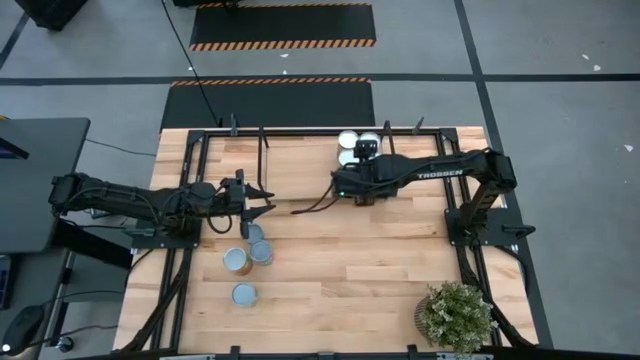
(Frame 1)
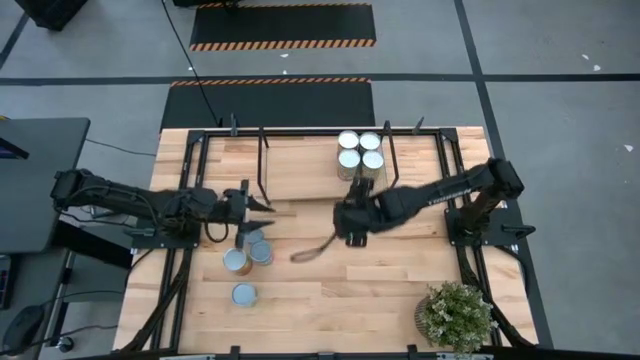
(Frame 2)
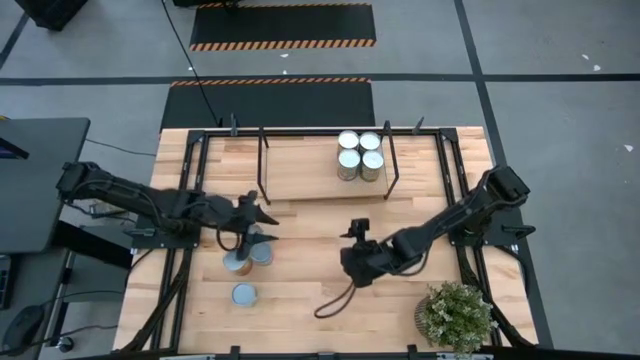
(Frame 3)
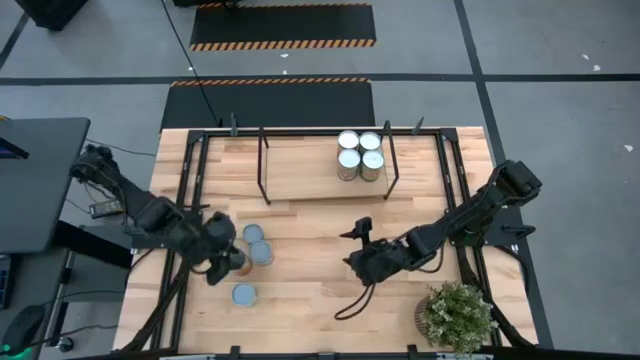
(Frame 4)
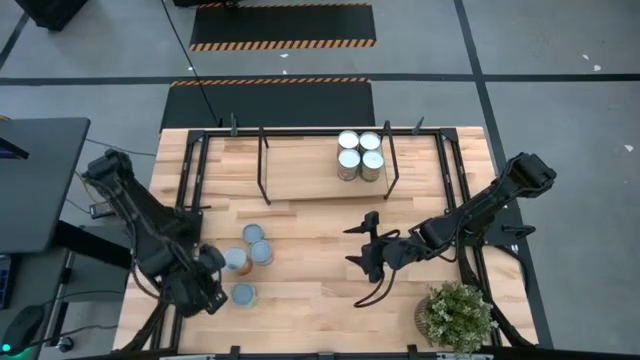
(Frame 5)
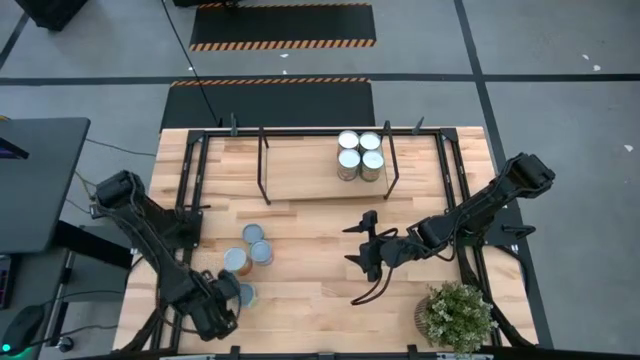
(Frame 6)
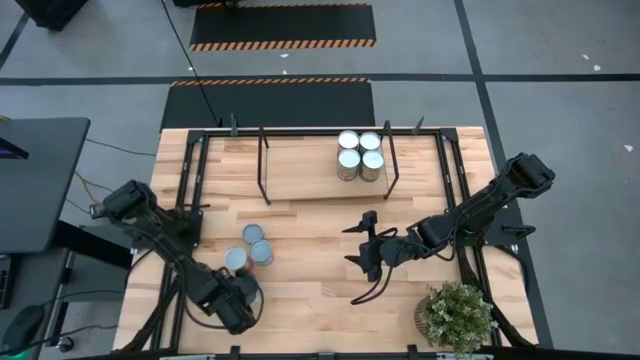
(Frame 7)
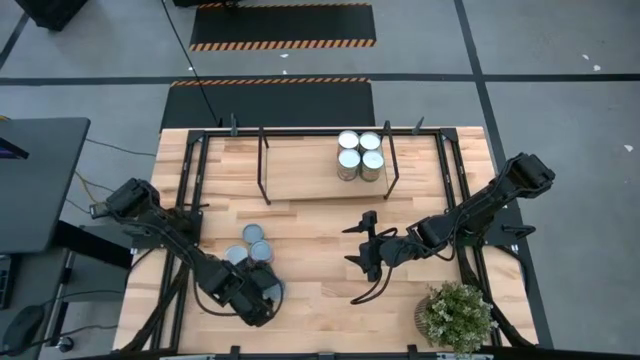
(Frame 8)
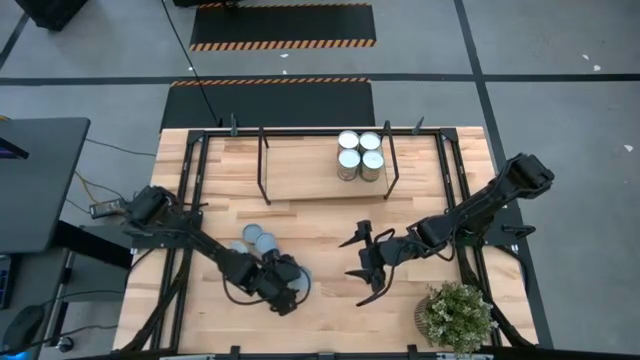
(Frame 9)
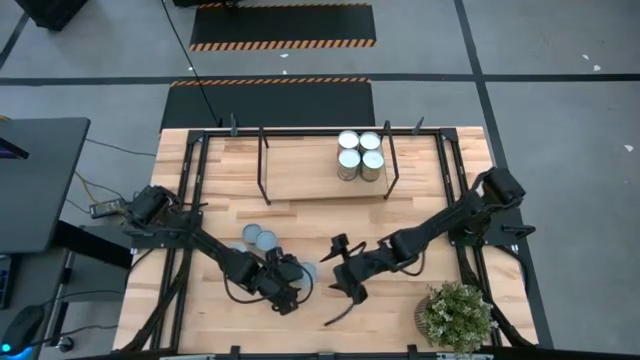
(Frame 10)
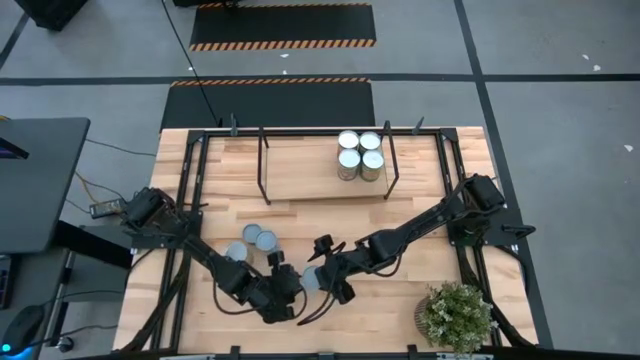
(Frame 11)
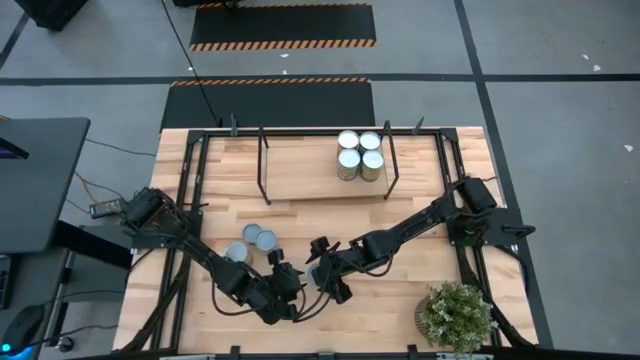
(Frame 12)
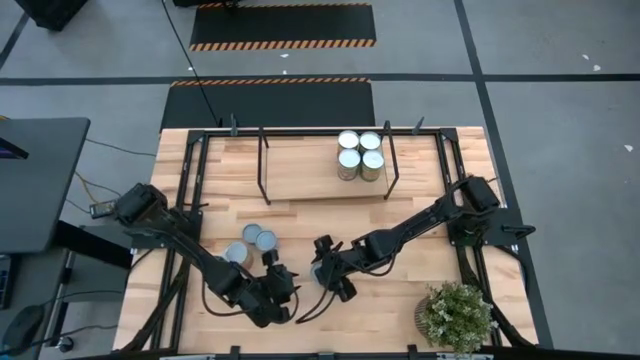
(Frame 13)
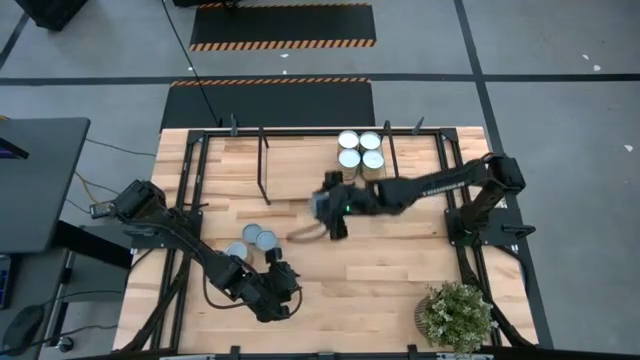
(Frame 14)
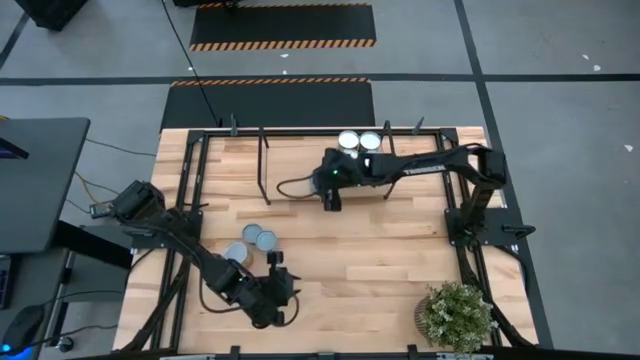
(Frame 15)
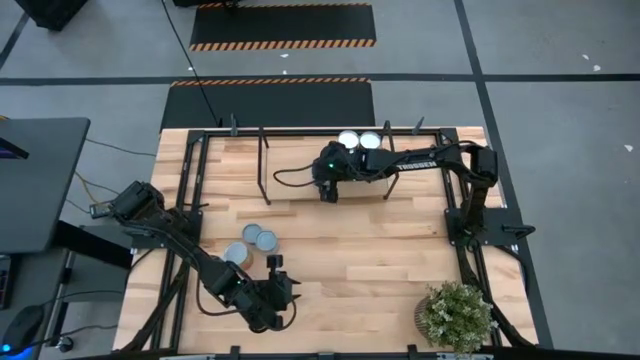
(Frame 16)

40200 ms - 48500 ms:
Task: Pick and place cans onto a shelf
Put the canned mixed vegetable on the shelf

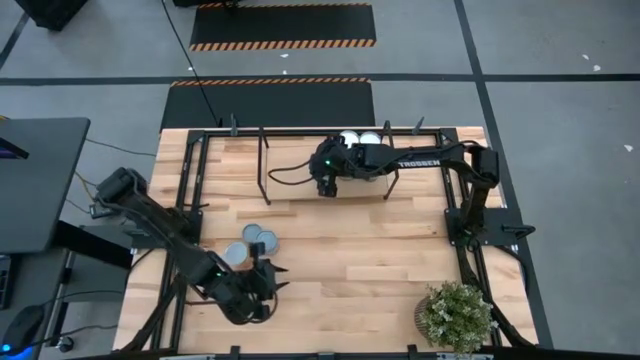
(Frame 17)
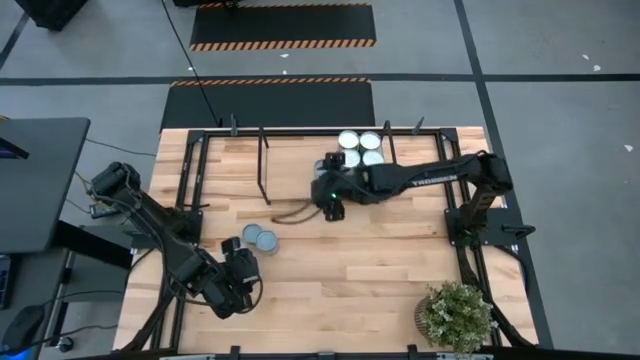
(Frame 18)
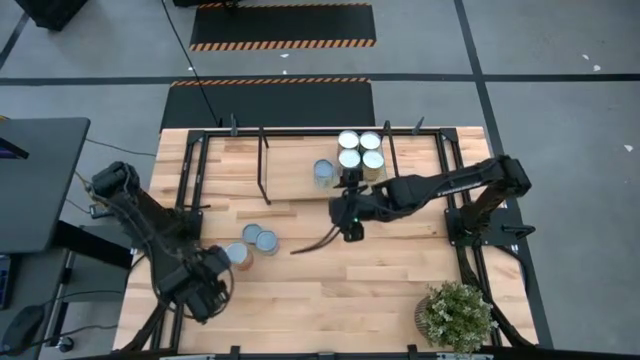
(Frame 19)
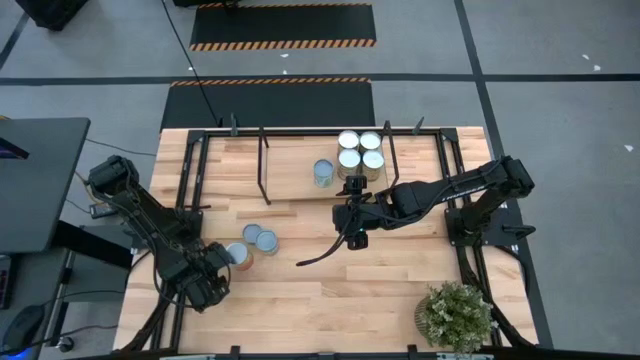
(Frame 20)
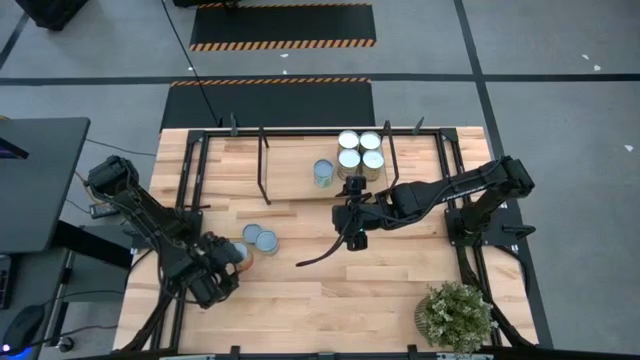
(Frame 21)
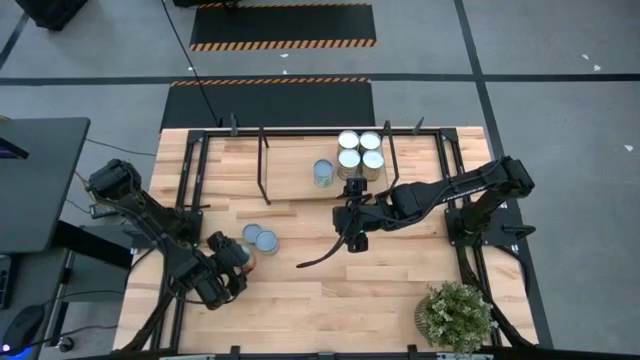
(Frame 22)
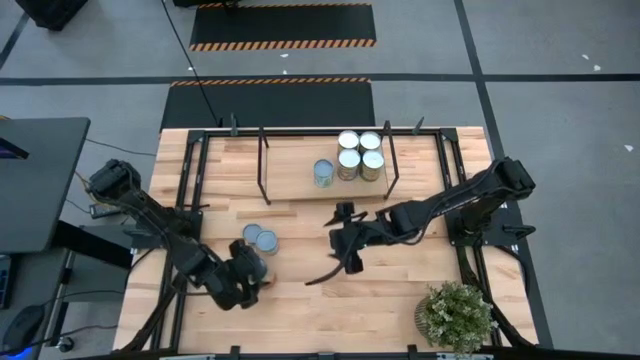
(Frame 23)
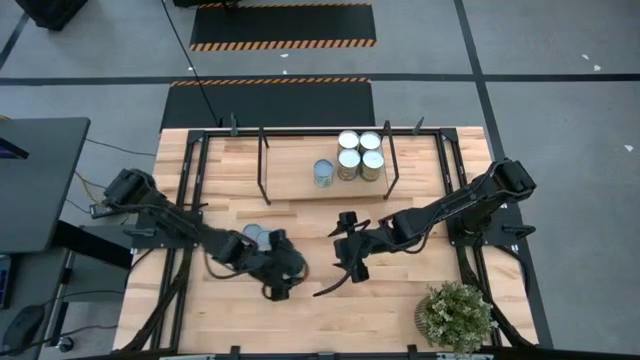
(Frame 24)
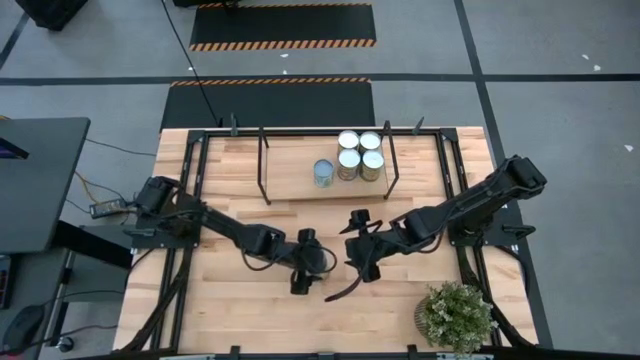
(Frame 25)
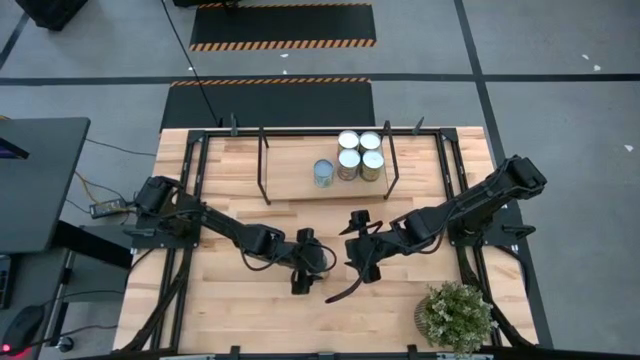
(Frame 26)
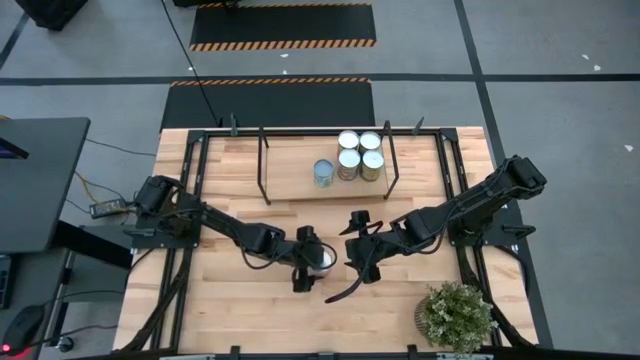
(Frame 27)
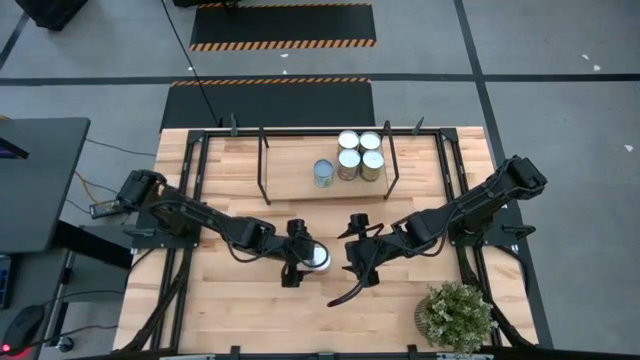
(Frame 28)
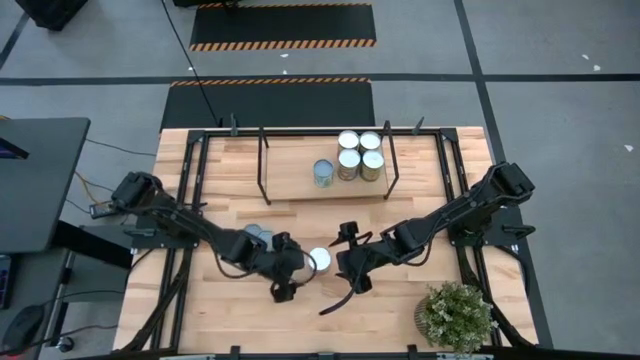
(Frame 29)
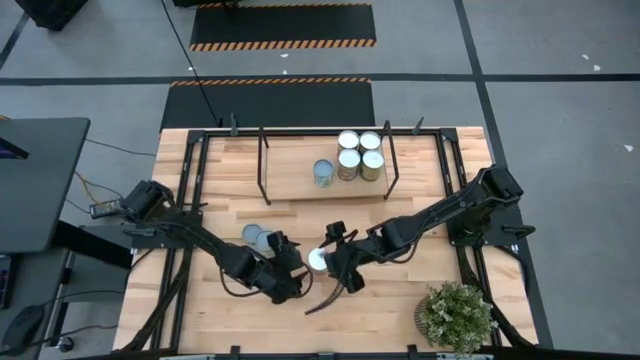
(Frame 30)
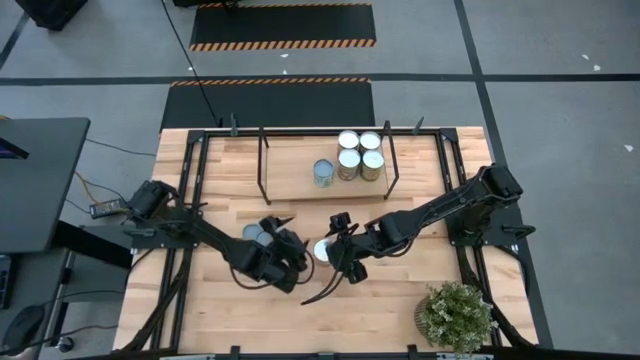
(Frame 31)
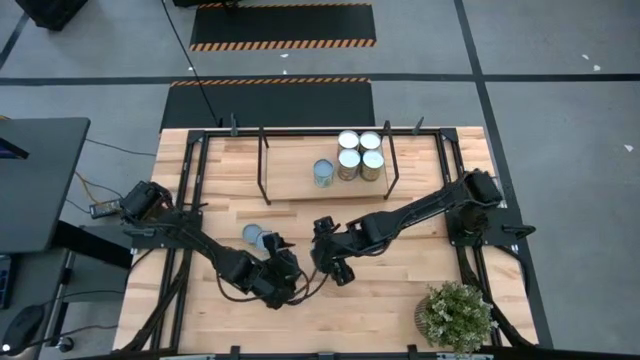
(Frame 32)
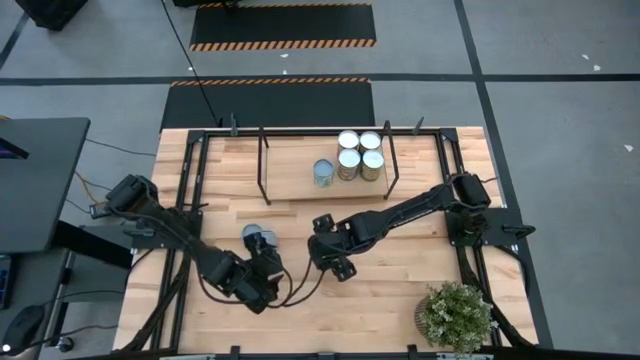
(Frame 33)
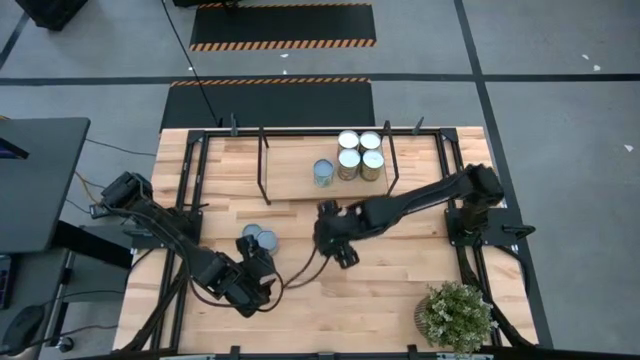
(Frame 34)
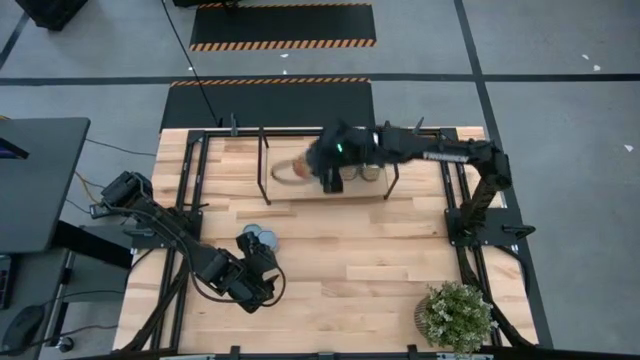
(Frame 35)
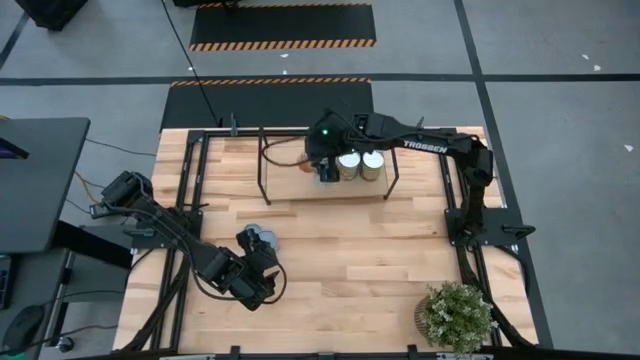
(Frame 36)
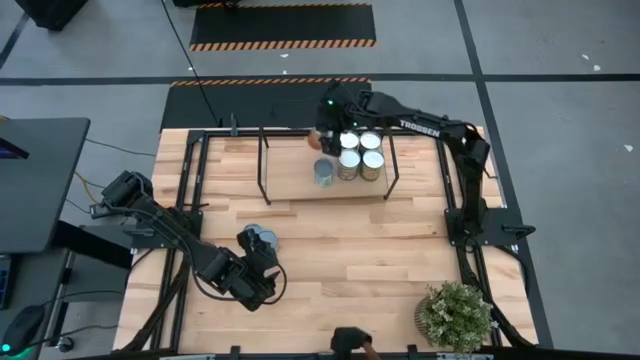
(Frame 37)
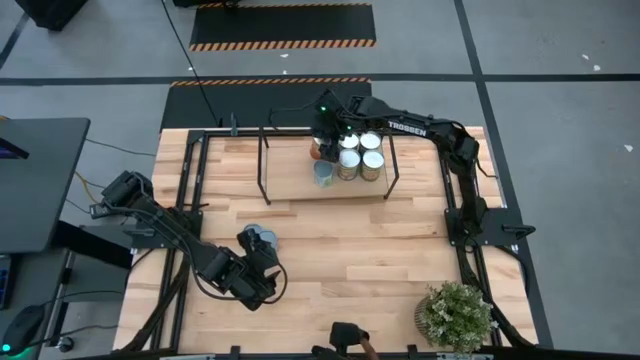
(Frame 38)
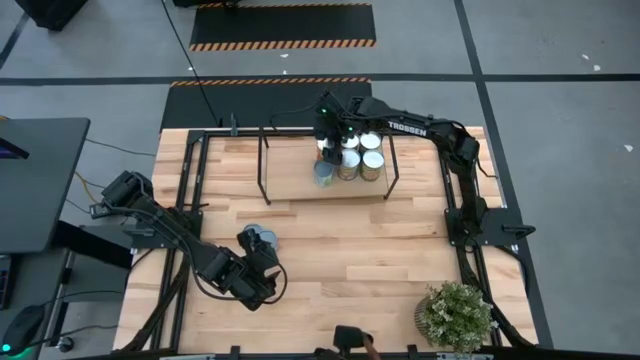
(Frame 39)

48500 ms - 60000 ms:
Put the canned corn on the shelf

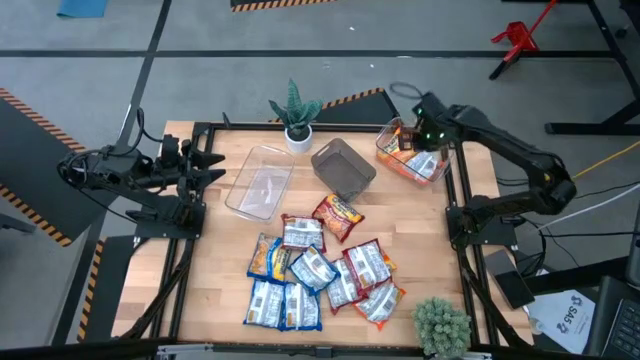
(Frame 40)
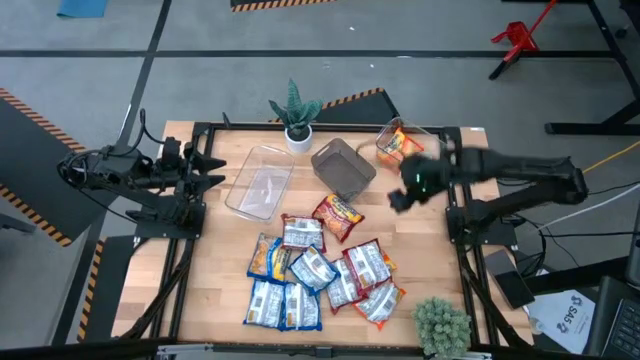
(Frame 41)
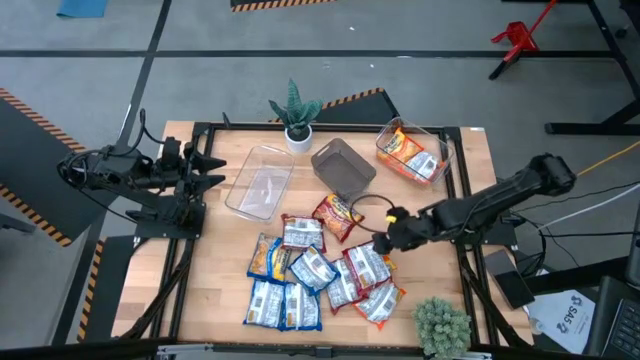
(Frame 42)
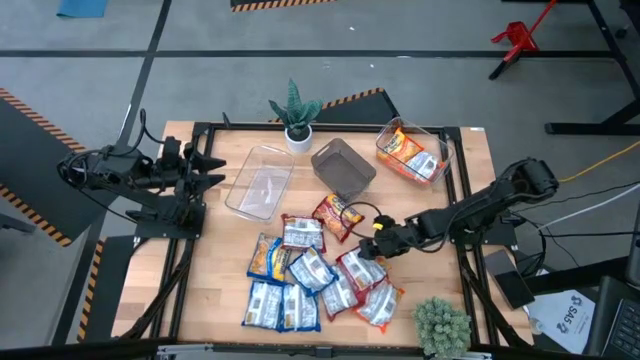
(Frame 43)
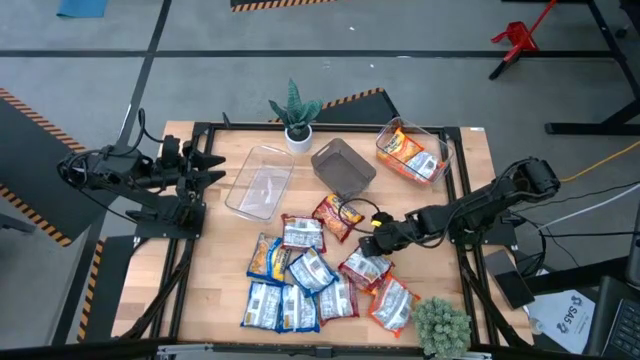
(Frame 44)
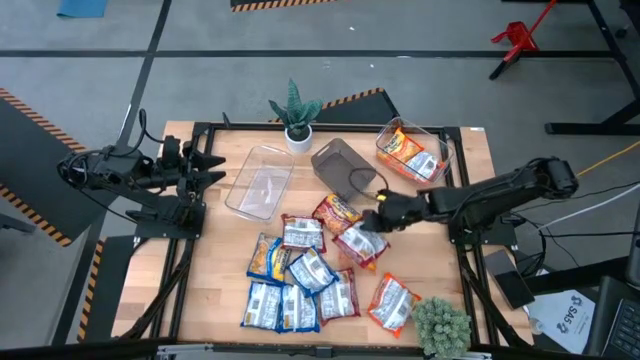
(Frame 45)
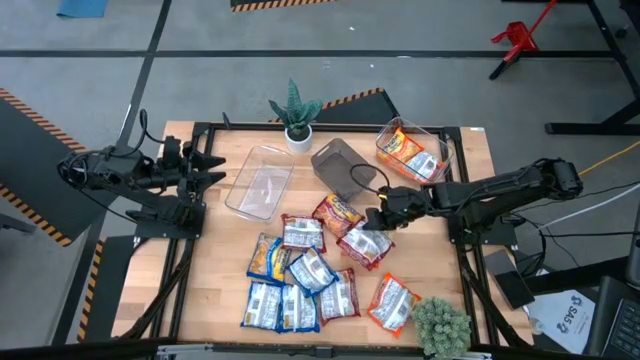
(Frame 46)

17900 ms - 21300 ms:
Task: Sort Maruchan noodles
Put the red noodle pack into the black bin
